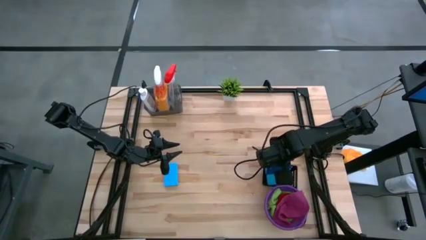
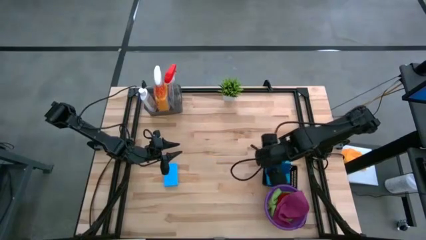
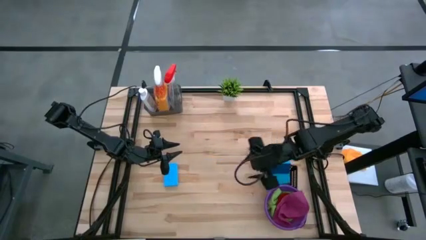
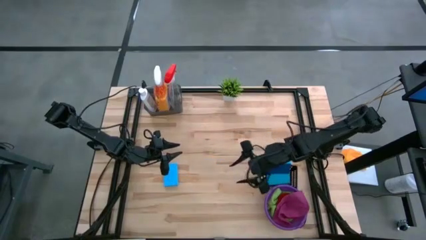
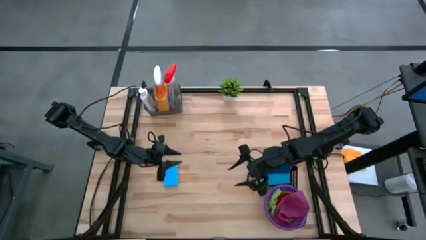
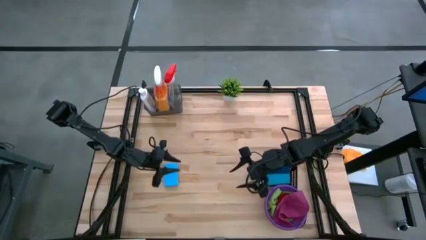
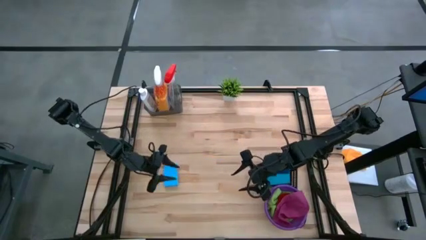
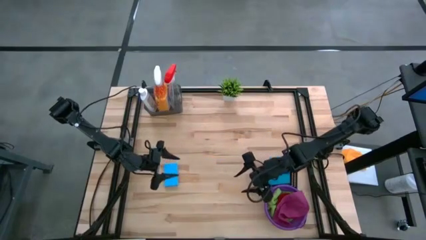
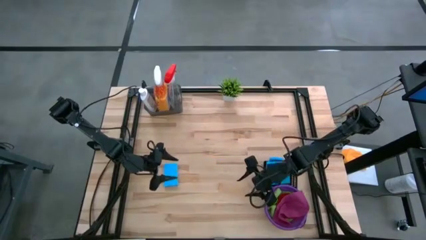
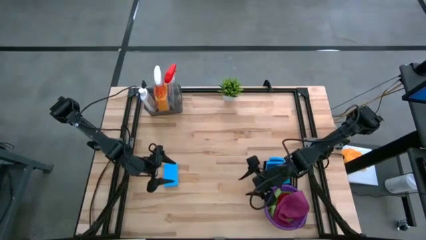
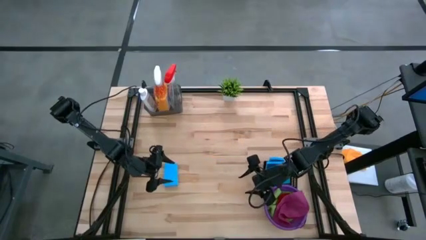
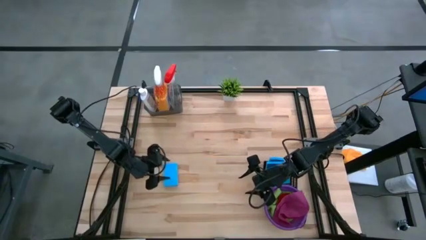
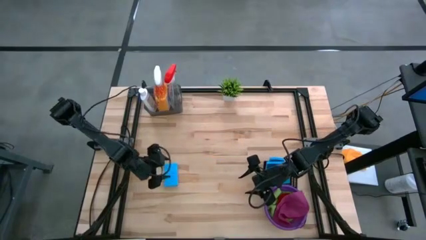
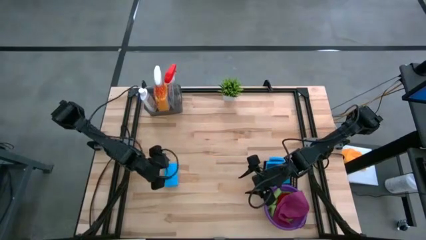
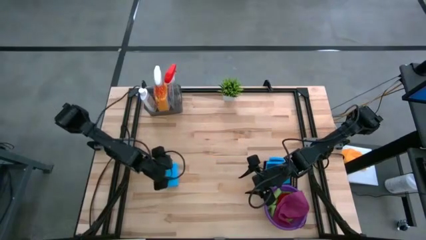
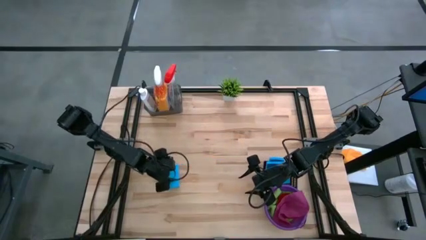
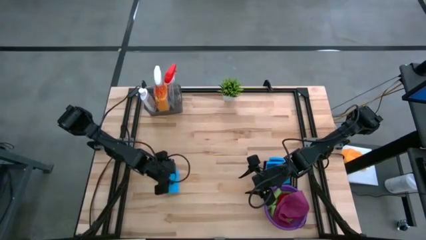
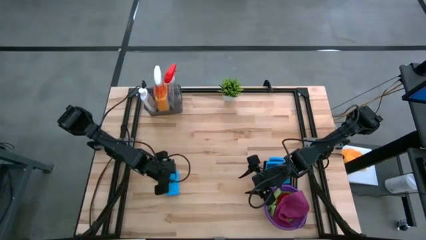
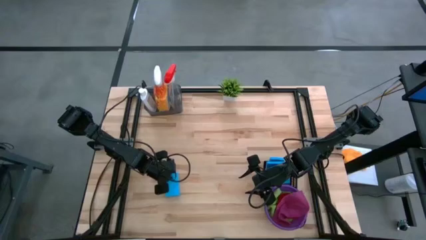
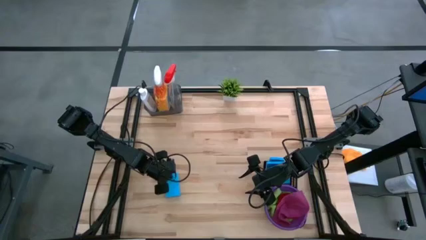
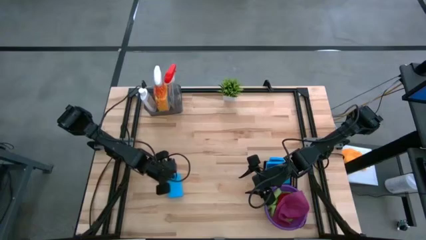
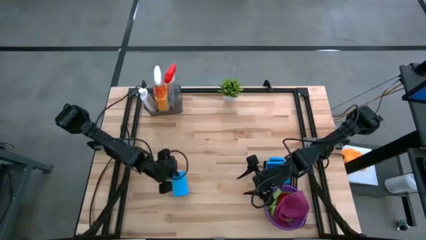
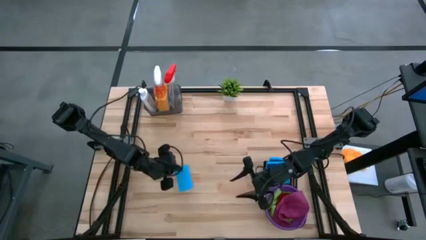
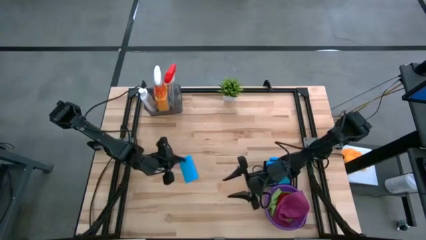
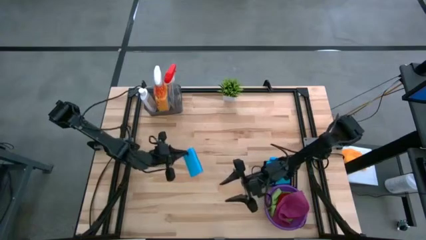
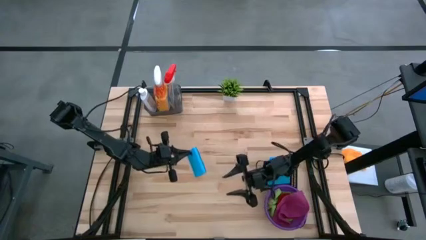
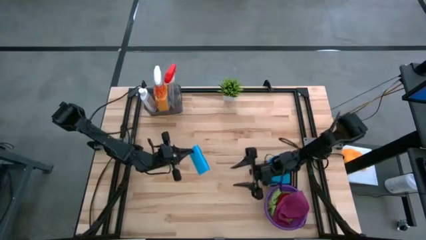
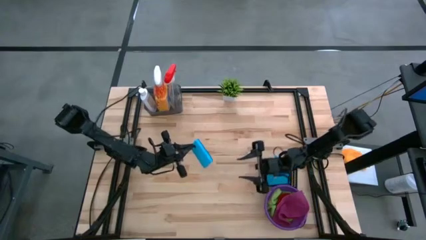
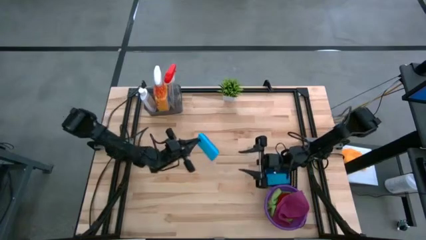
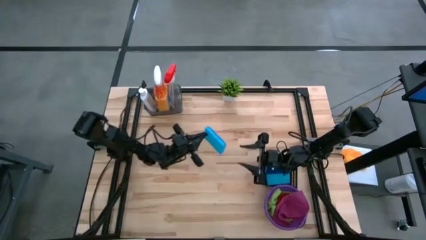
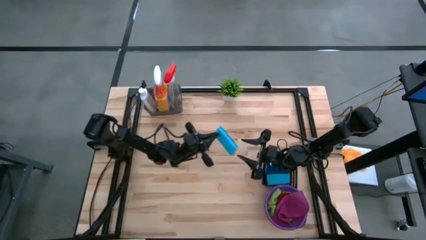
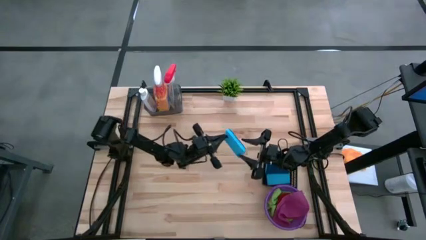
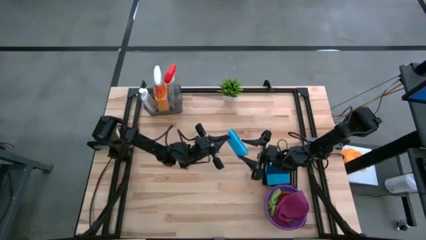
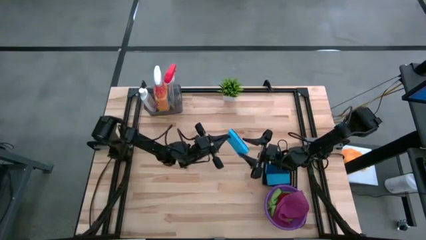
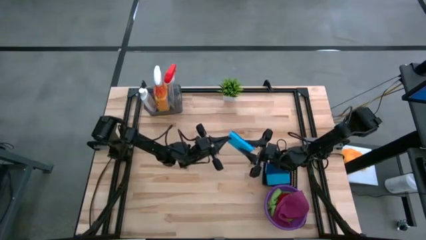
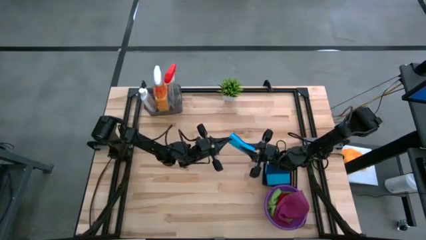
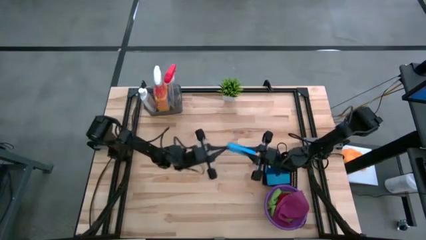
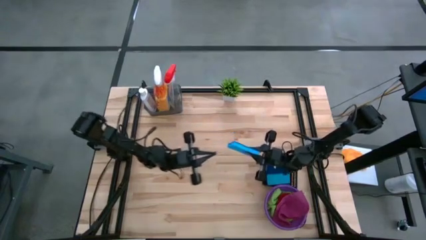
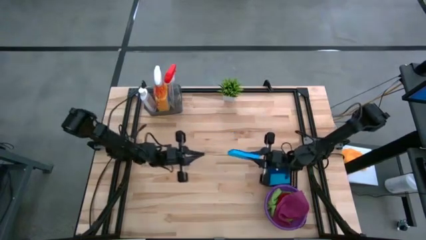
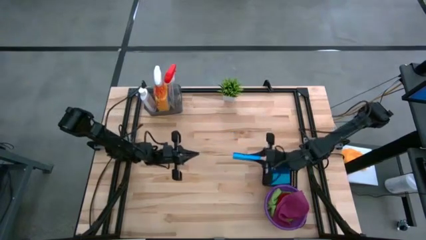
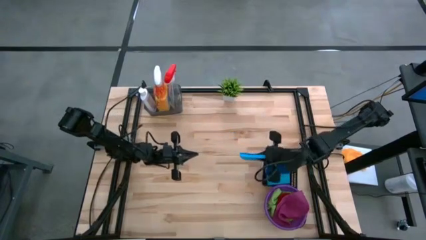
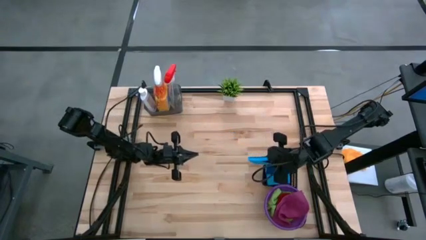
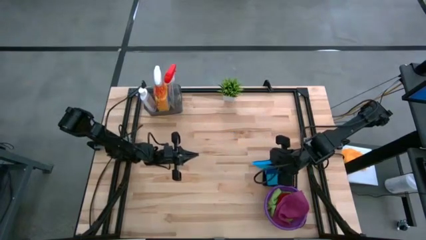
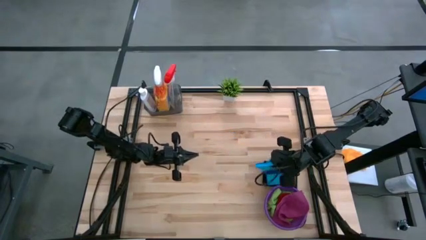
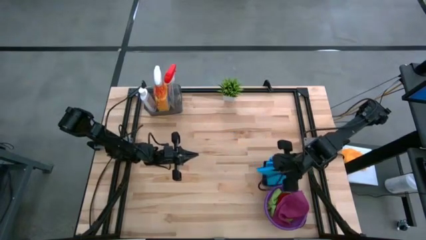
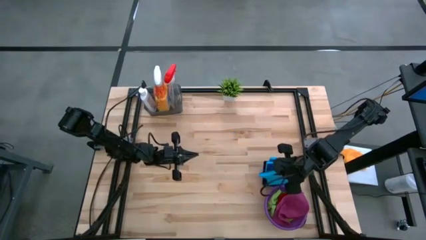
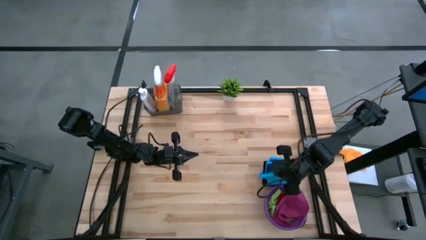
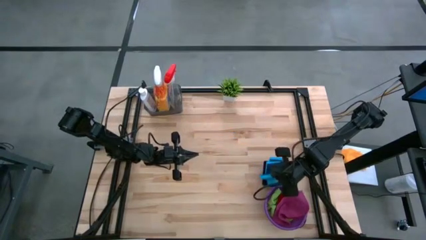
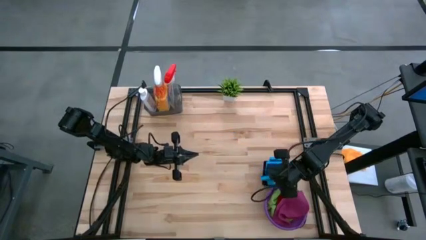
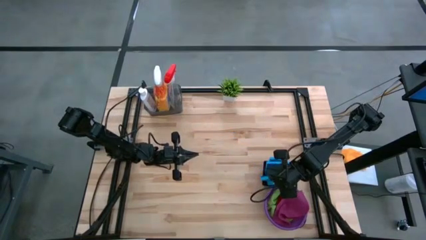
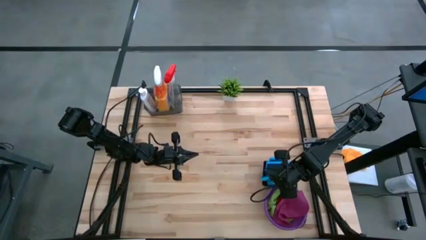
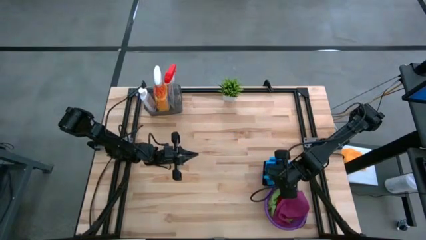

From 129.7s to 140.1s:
Task: Pick & Place Kitchen Items
Put the blue sponge into the black bin

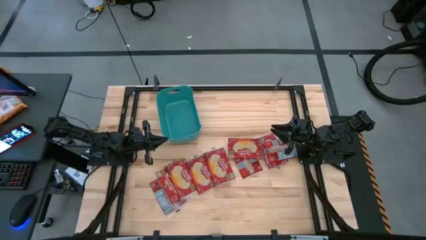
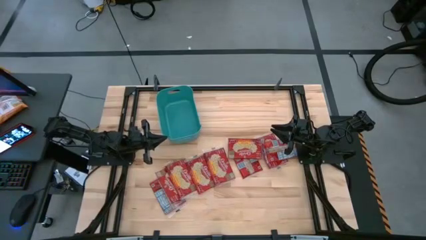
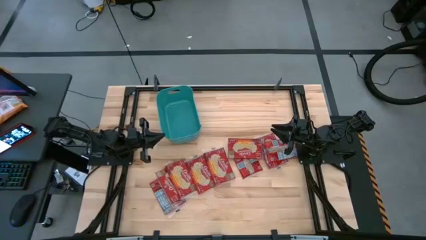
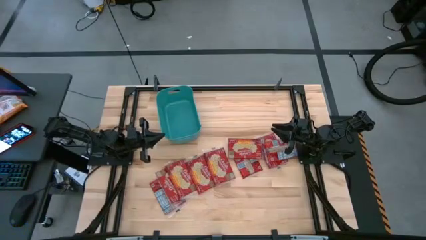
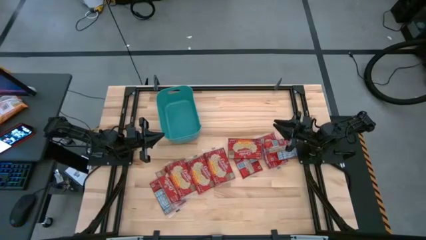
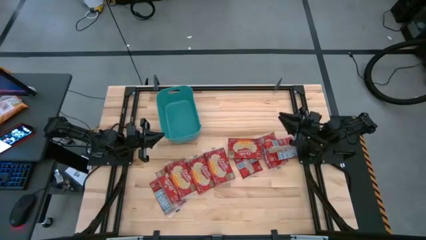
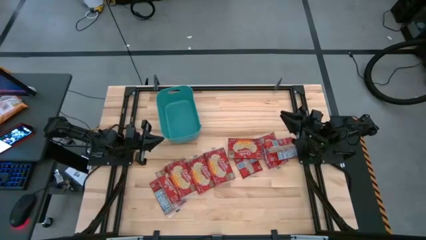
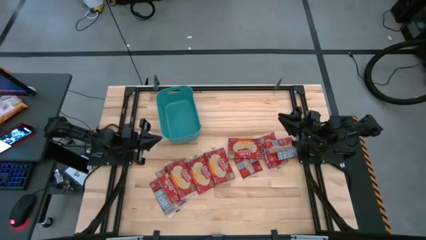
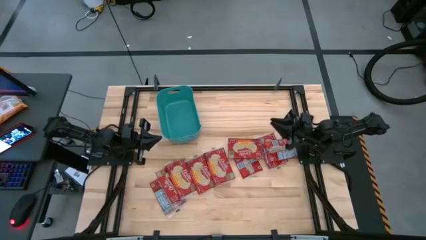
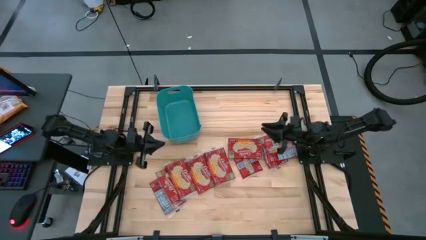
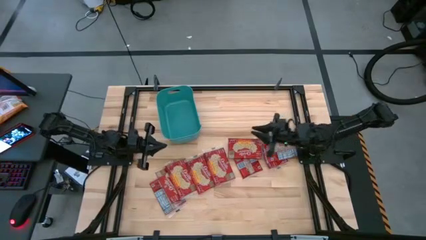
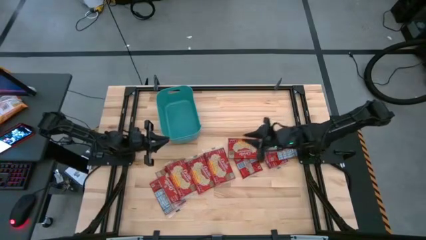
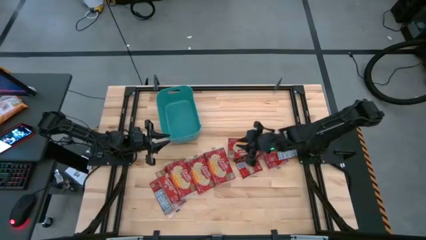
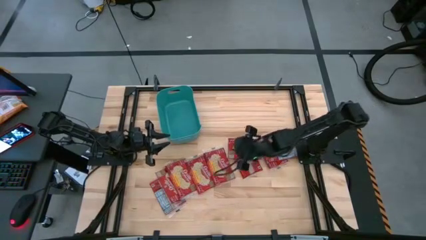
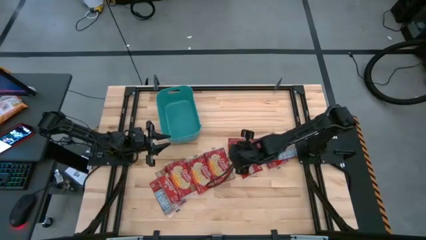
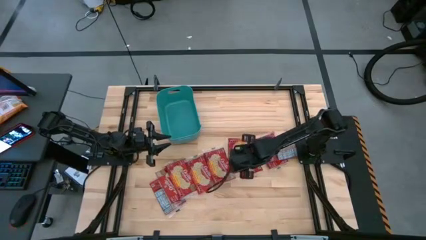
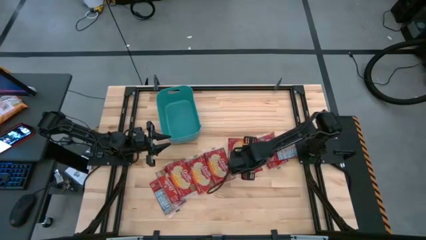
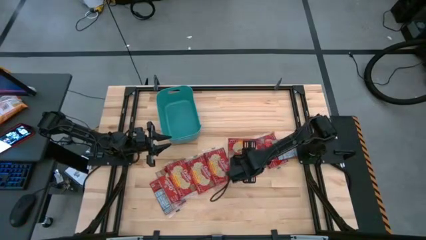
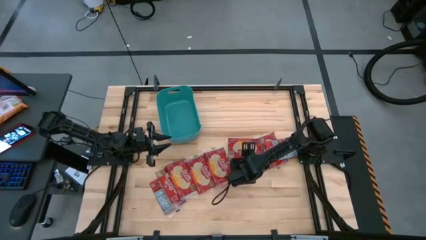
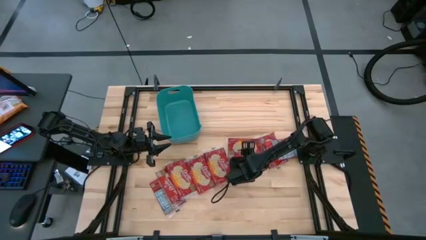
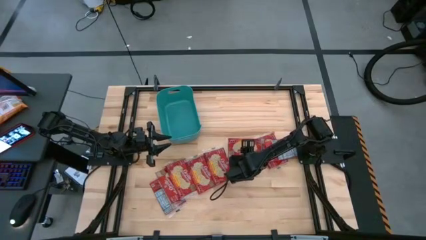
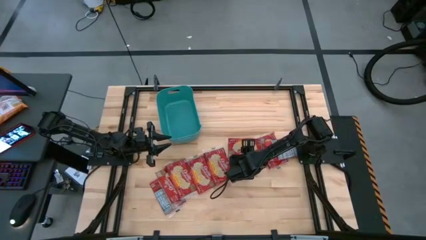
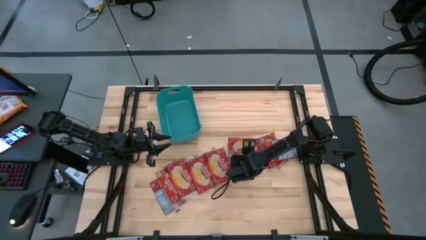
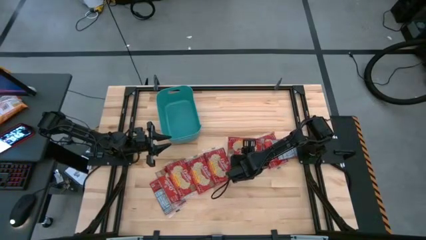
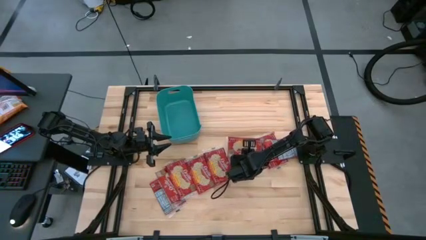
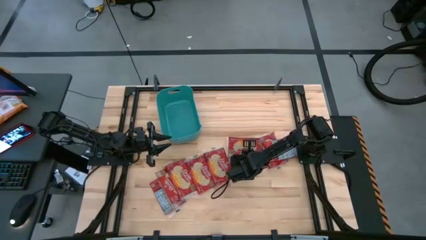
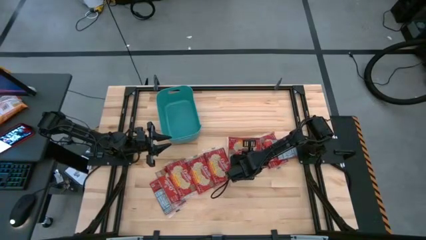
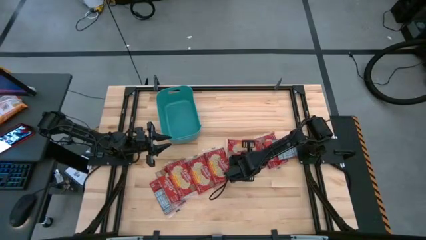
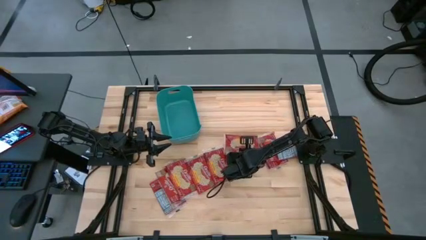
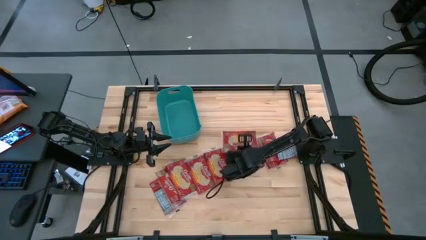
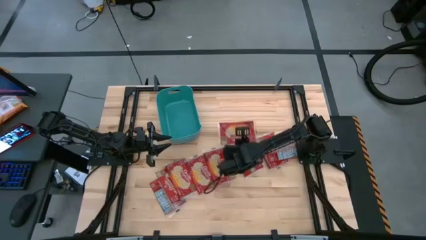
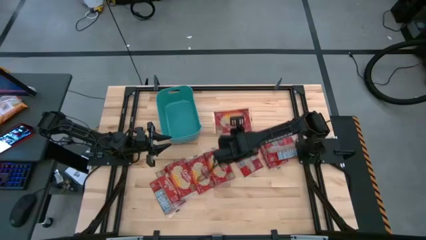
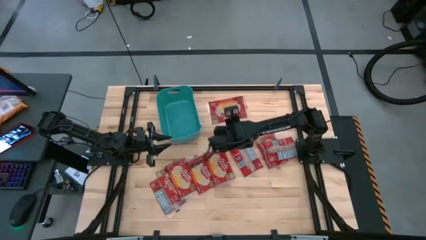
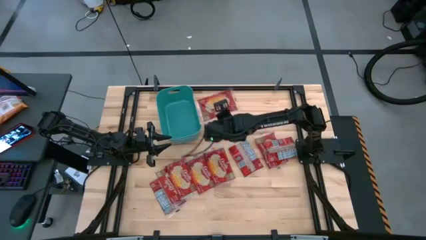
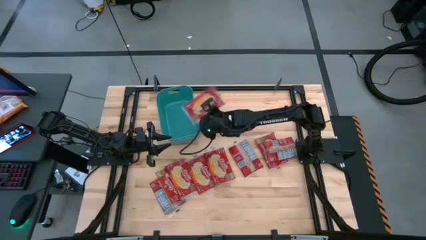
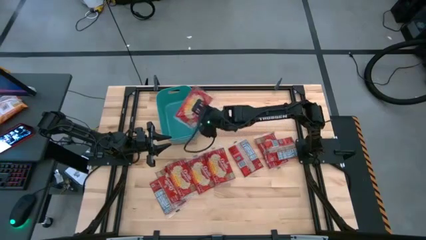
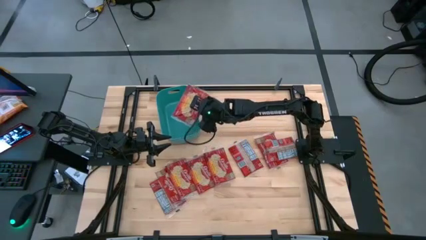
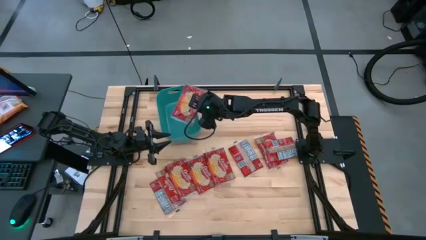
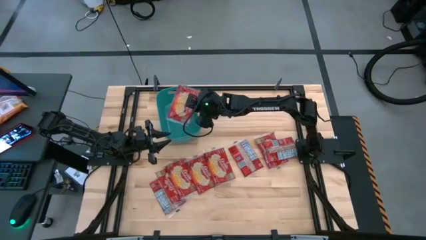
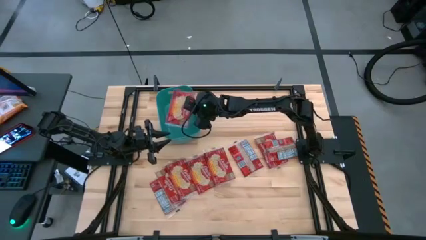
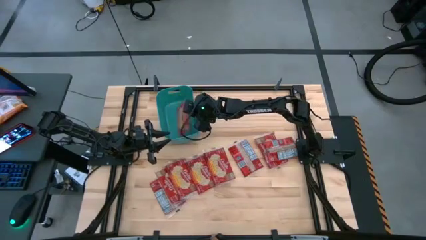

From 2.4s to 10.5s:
Task: Sort popcorn bags into baskets
Put the red popcorn bag into the green bin
